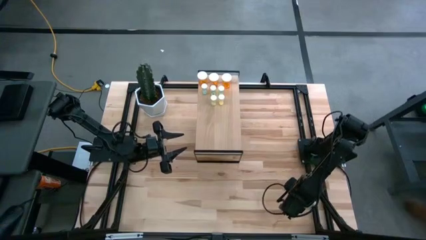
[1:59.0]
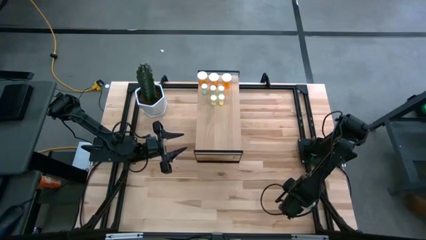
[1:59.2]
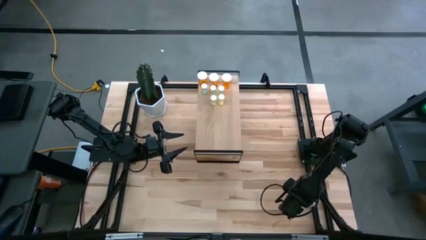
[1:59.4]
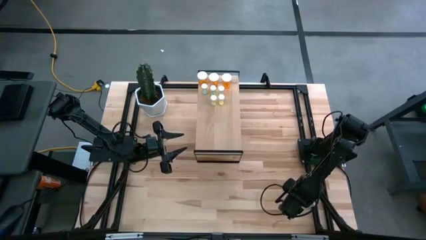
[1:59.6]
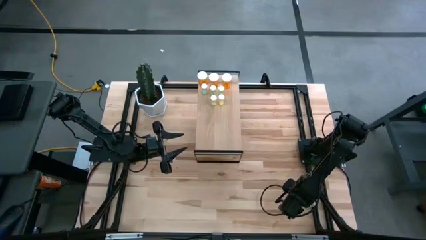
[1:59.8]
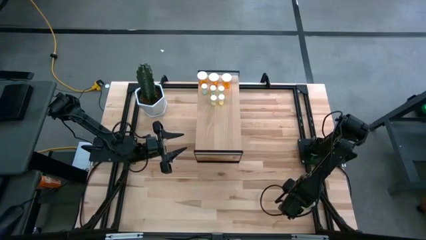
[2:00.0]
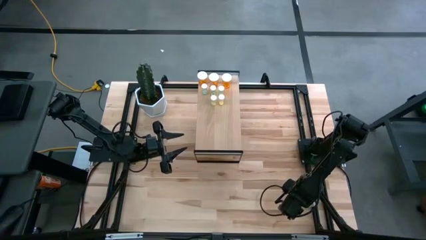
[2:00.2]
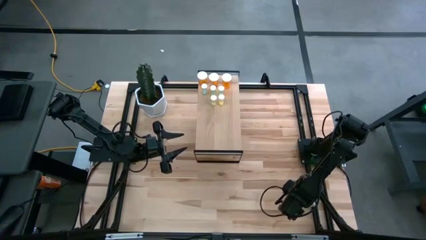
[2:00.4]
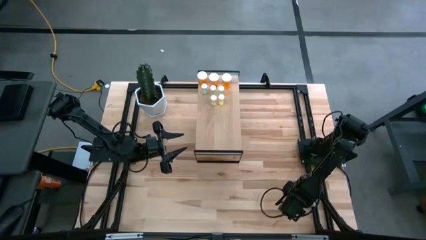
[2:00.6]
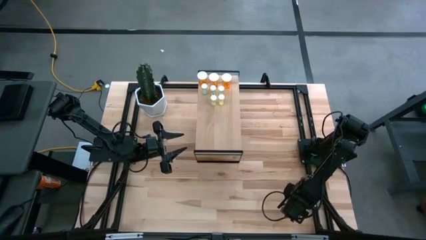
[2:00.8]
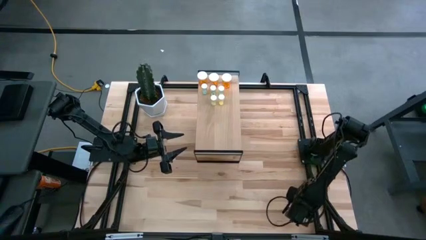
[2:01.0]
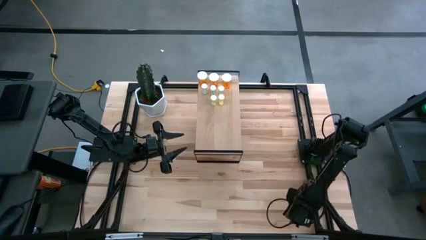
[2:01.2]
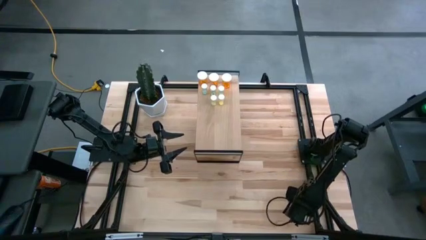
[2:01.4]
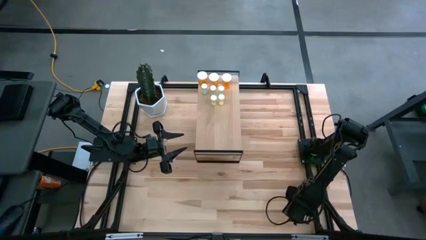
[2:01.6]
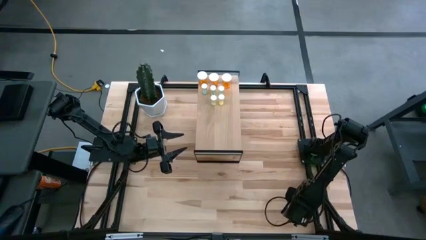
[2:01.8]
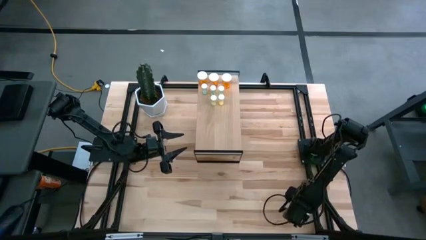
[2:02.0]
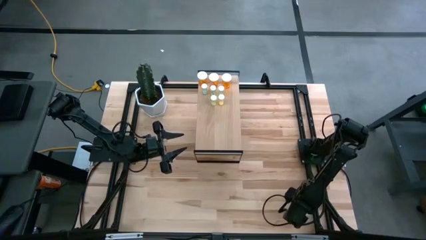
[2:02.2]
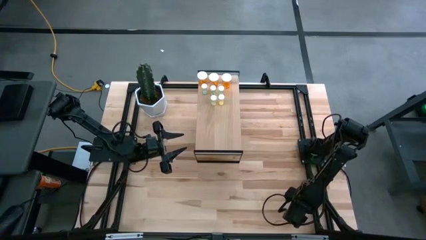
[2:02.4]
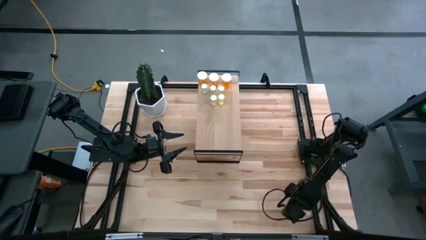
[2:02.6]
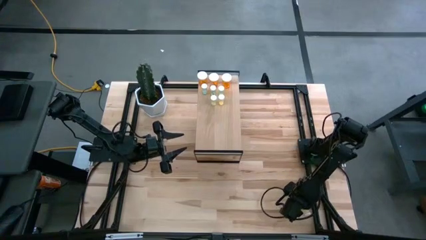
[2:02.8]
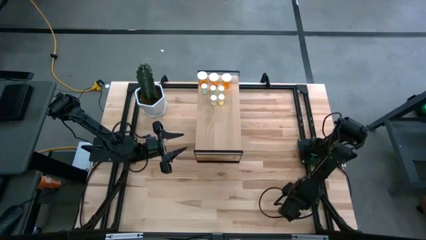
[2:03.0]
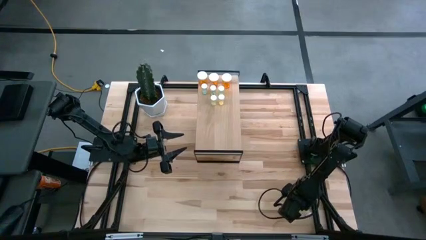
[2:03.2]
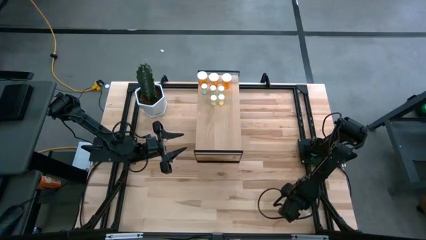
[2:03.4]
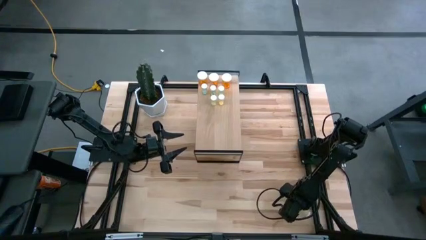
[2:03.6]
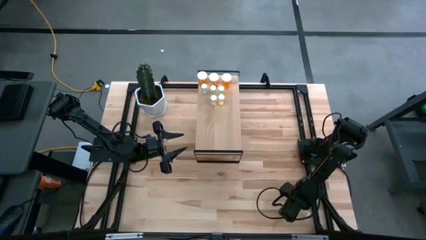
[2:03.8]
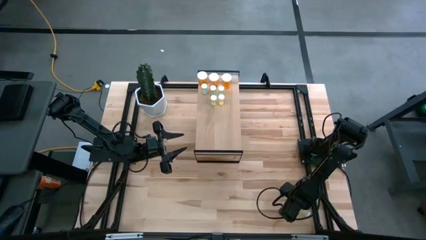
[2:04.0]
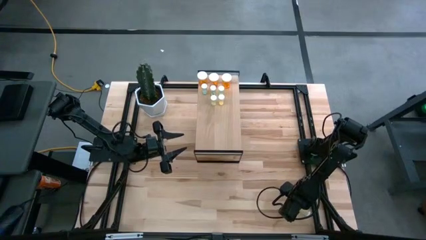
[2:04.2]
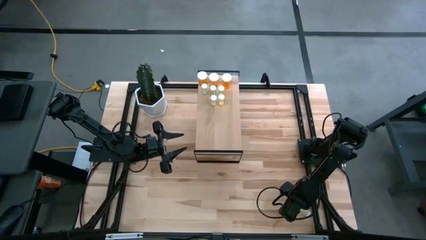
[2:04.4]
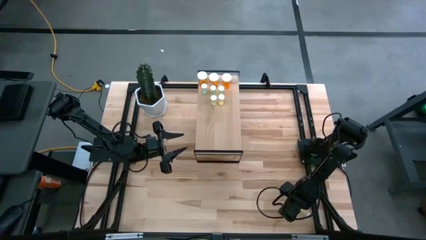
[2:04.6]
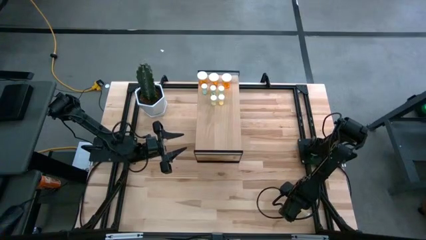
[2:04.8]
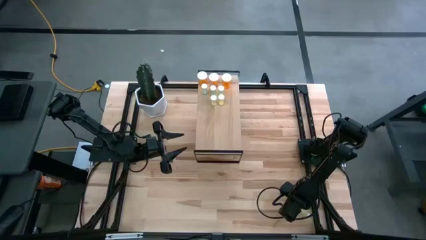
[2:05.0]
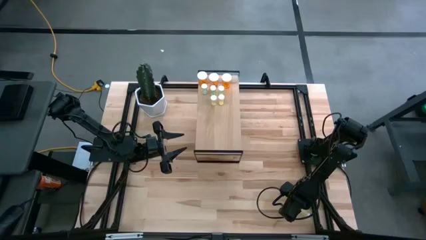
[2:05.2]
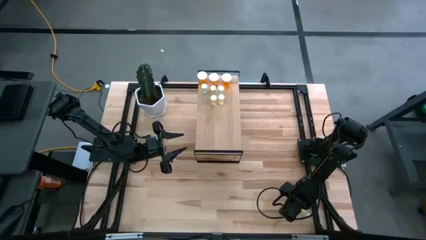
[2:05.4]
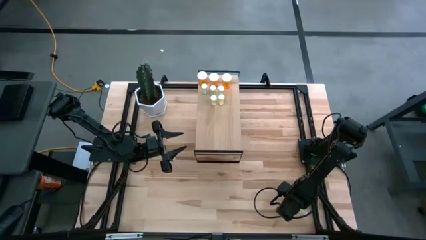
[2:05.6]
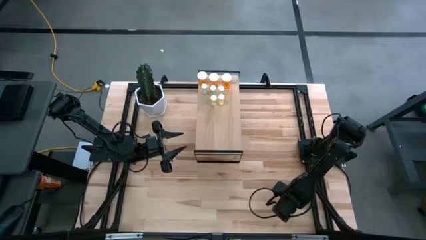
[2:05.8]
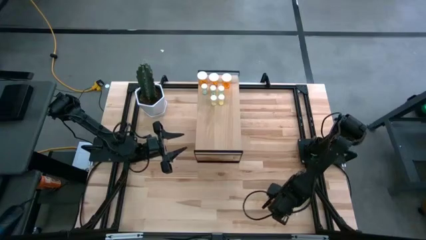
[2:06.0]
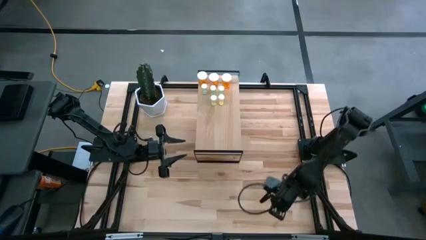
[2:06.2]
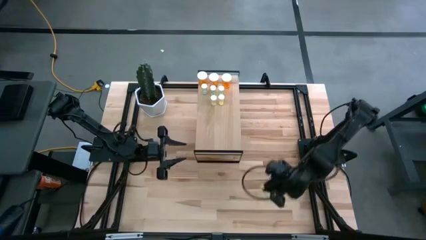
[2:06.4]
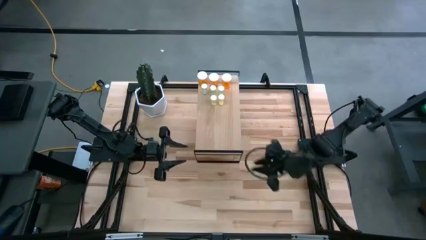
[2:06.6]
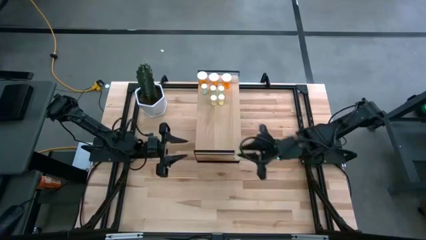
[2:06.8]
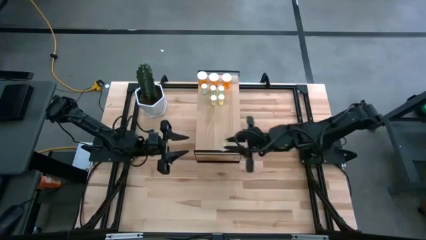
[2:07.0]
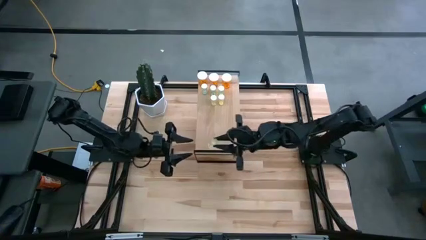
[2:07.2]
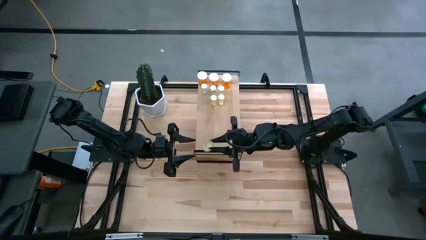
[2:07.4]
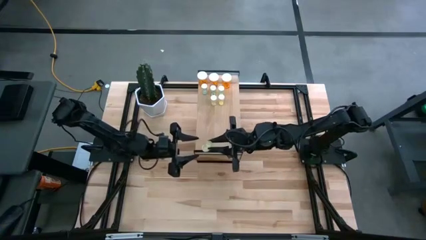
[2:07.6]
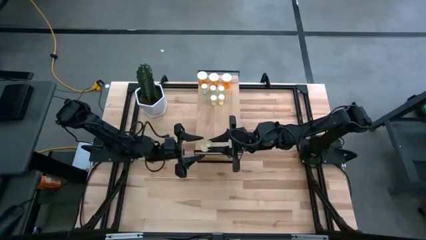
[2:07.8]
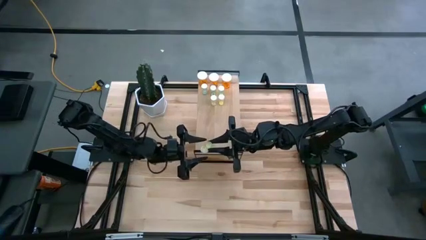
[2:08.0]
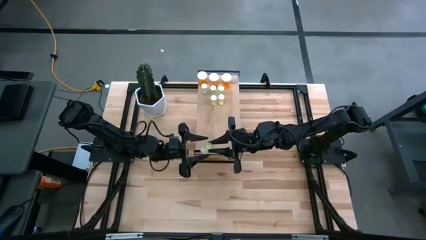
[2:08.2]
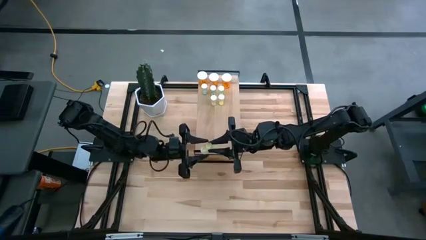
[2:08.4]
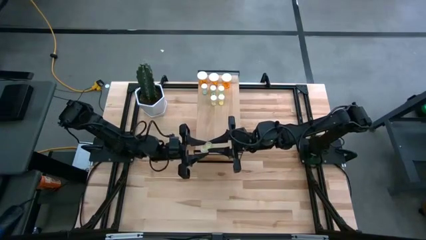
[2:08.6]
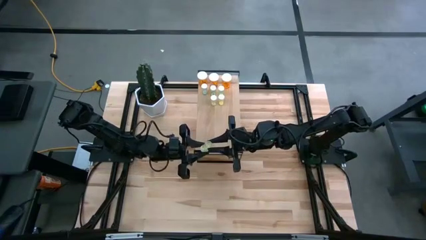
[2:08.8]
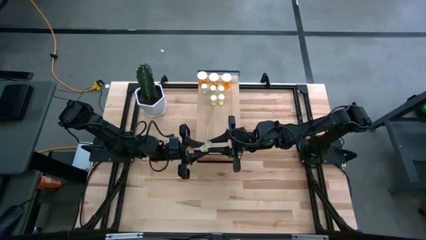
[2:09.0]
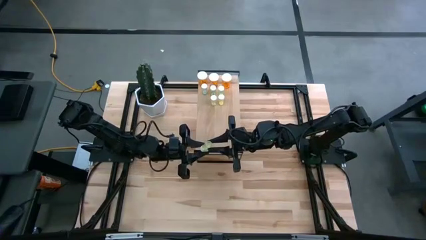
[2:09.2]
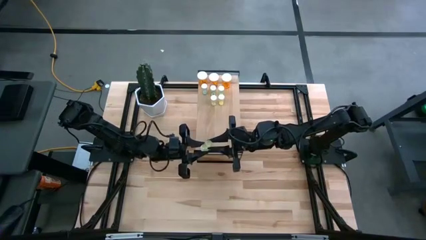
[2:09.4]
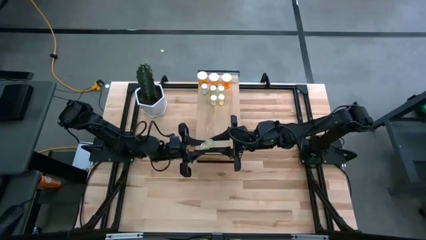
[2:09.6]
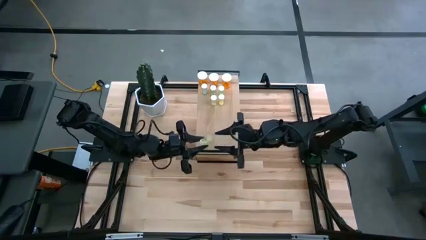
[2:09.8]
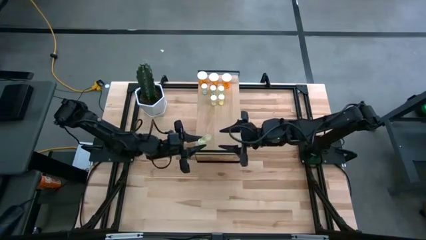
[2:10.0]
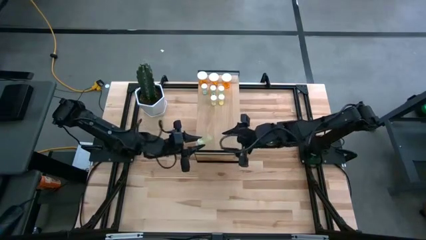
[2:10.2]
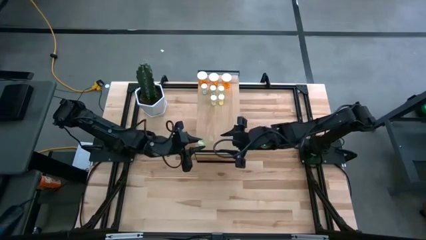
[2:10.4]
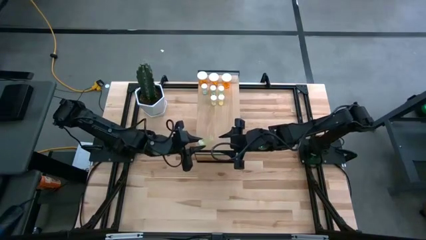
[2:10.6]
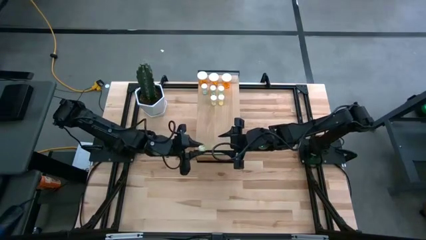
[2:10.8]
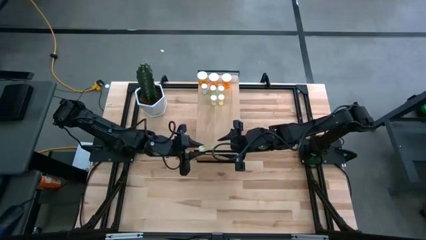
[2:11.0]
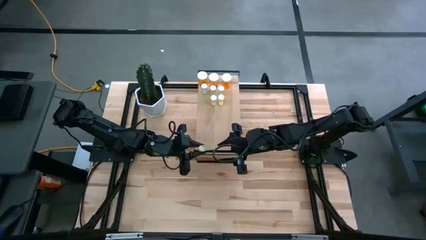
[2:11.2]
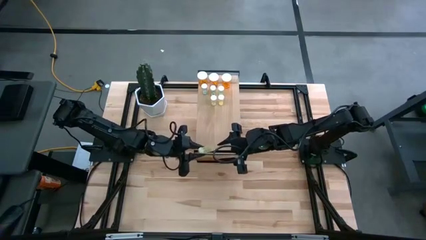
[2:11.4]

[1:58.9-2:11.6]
Task: Pick and place medicine bottles onto shelf by color
Put the yellow pill bottle on the shelf aligned with the other yellow pill bottles

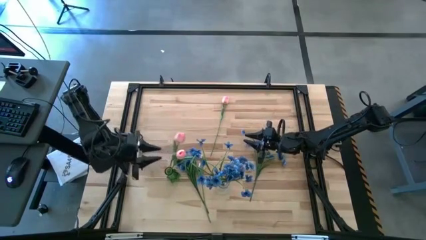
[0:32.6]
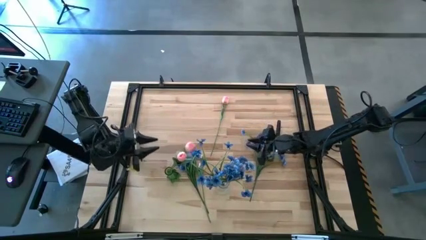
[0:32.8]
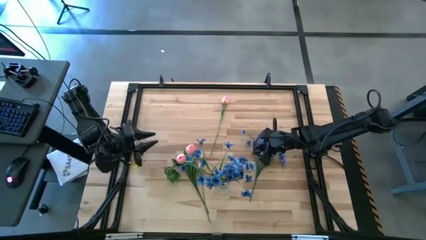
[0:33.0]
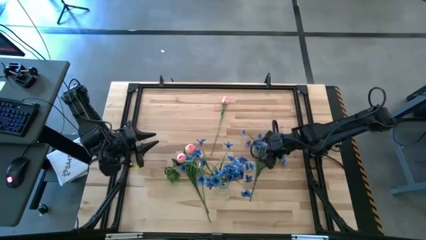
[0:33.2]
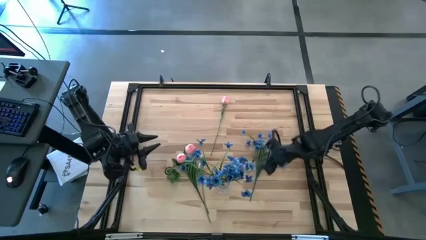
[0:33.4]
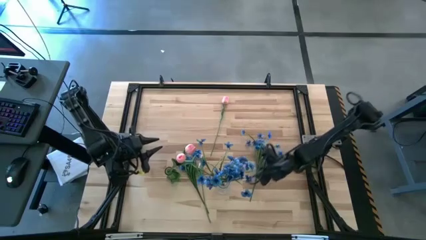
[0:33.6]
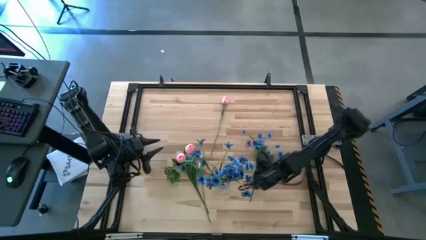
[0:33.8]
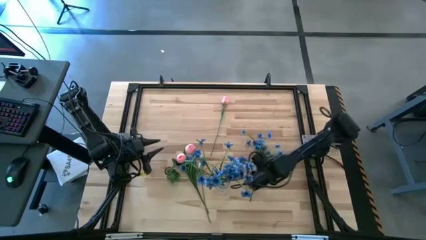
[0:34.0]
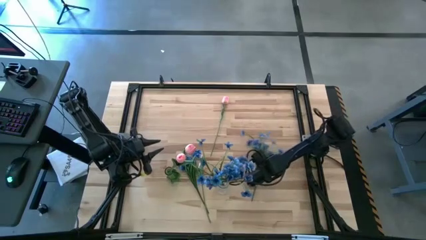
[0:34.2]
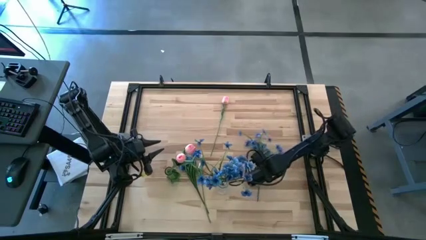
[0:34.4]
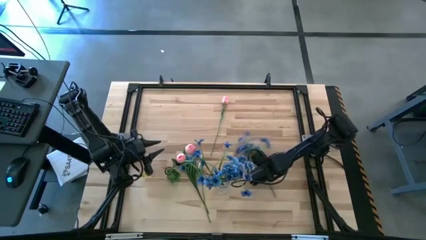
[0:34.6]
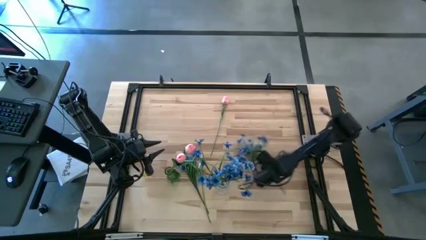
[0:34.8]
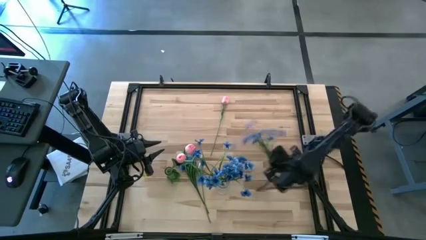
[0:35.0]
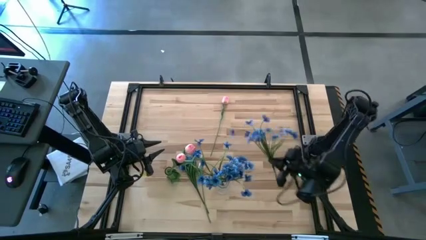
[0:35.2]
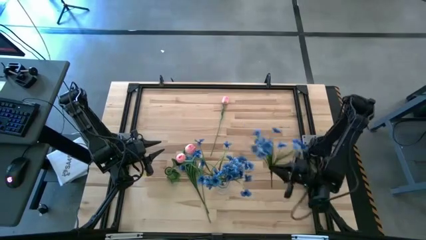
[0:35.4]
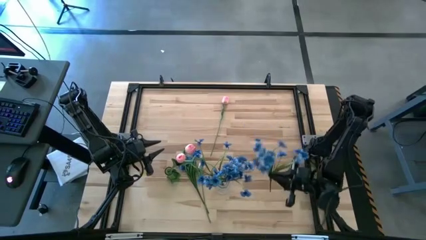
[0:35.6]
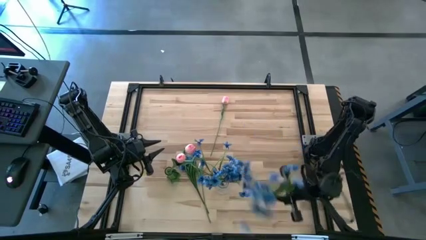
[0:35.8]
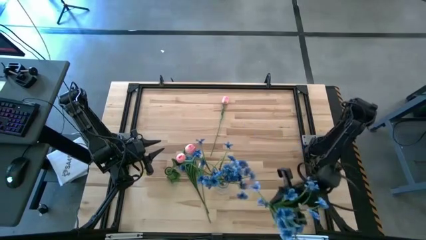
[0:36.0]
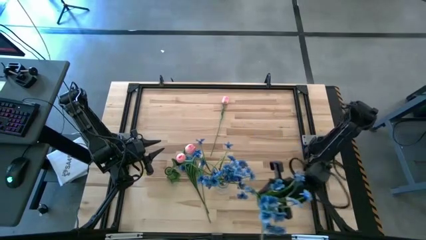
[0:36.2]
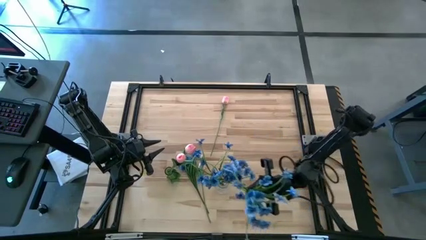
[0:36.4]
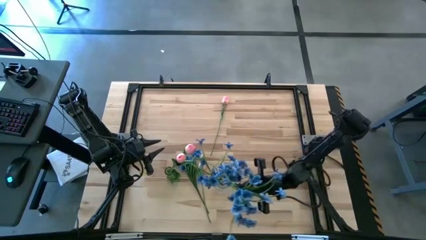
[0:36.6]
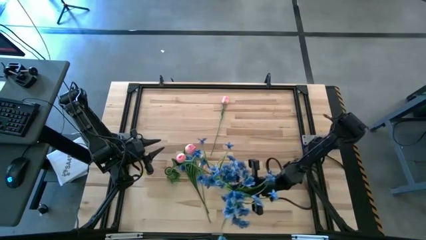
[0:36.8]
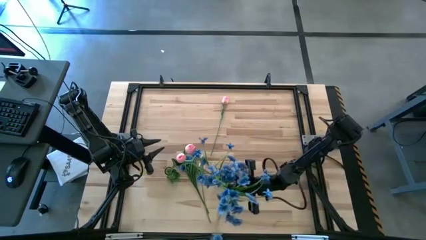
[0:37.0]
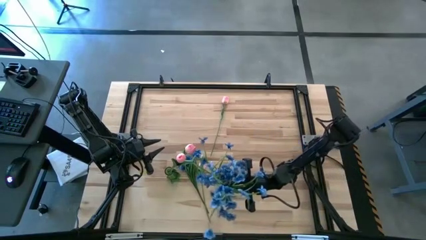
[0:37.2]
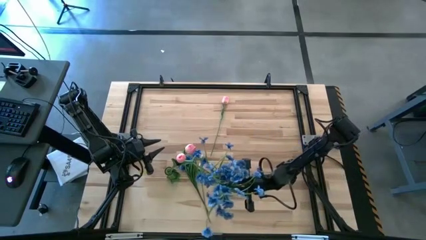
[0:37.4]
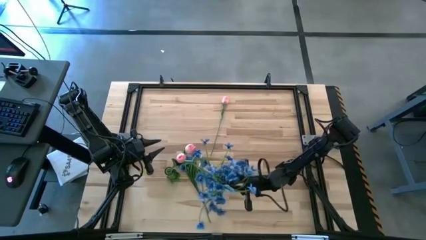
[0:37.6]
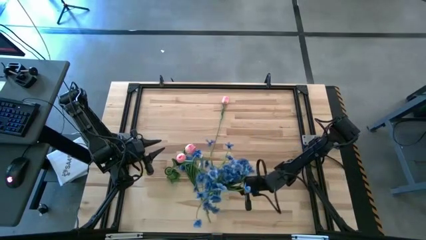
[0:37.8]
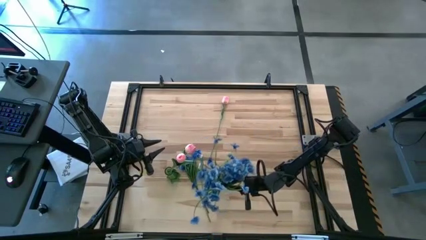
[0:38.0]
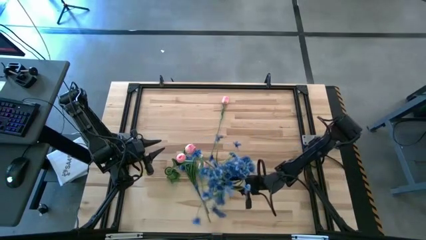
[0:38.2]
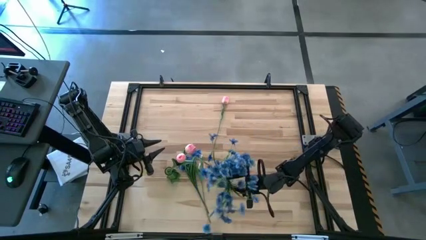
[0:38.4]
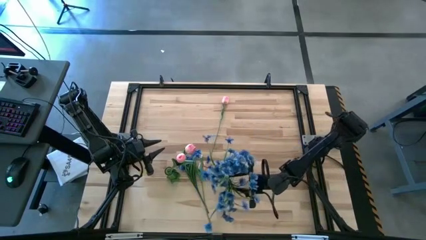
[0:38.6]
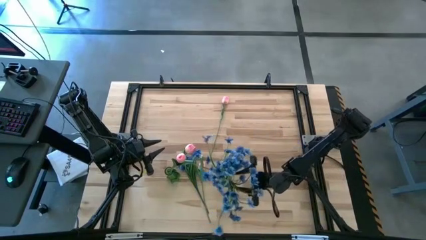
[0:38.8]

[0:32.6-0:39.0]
Task: Sort flowers into vase by color
Put the right blue flower into the transparent vase
